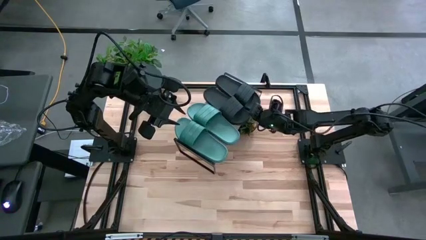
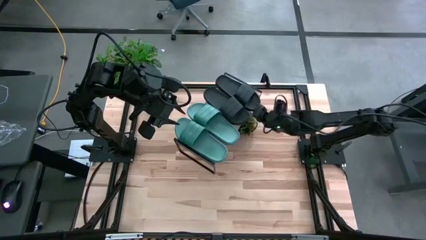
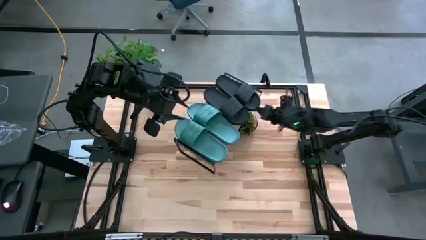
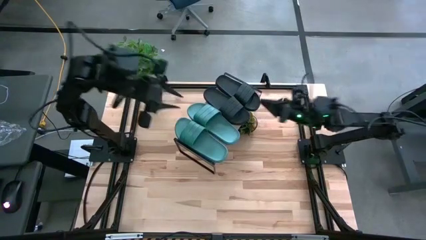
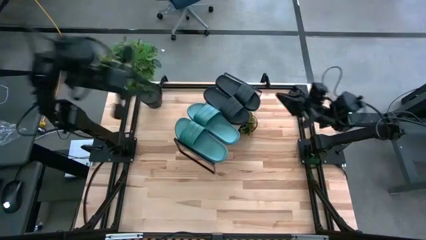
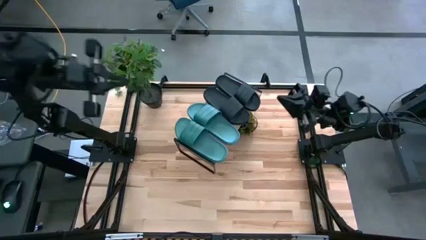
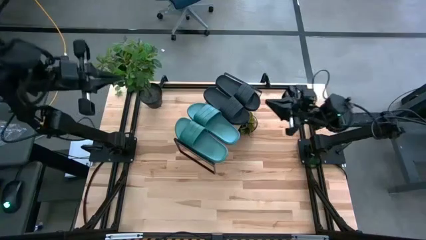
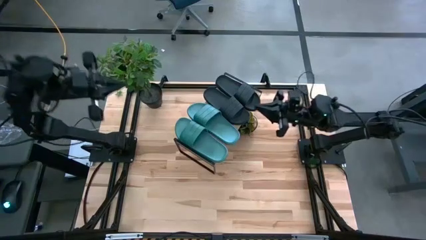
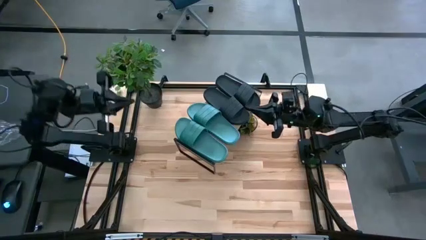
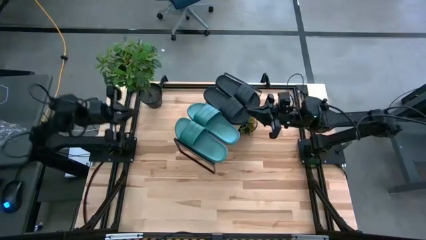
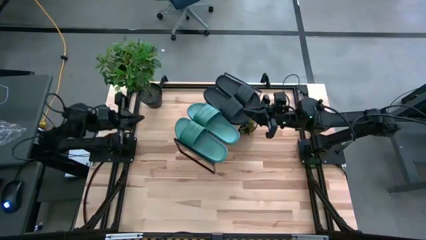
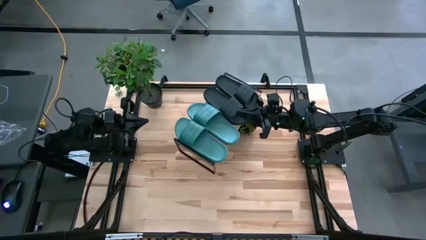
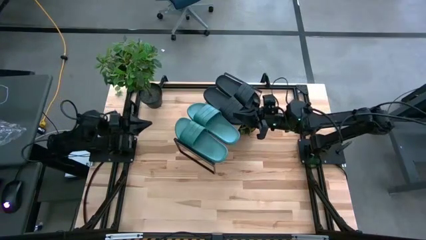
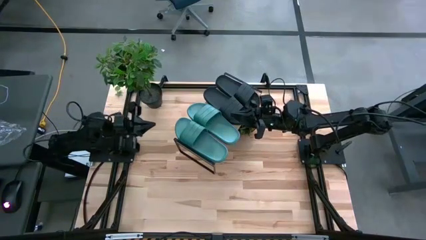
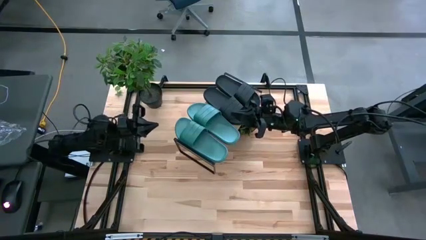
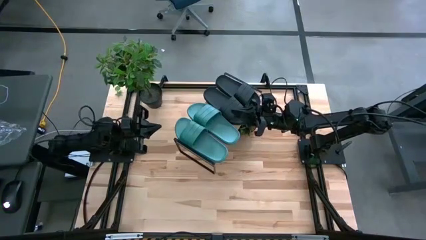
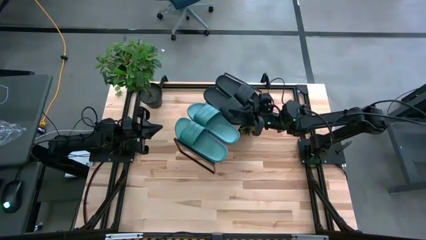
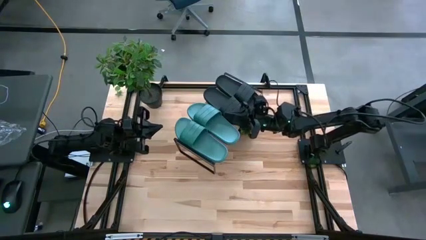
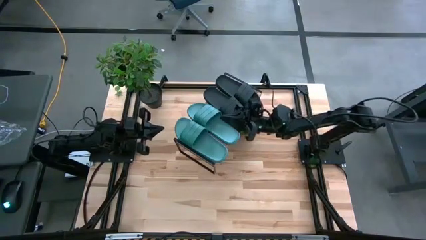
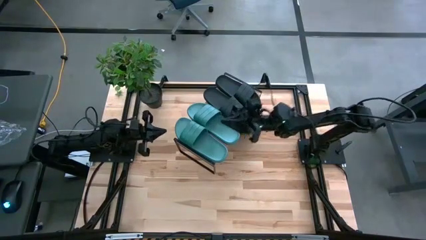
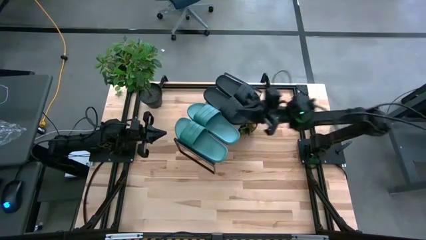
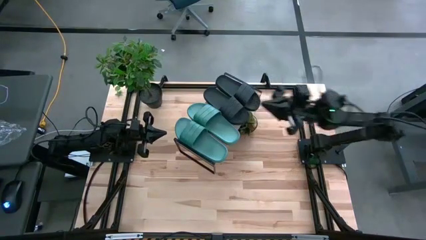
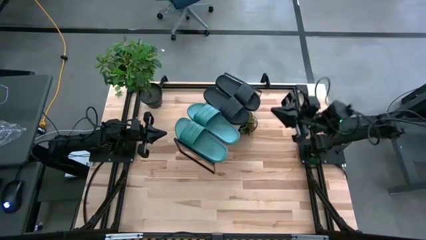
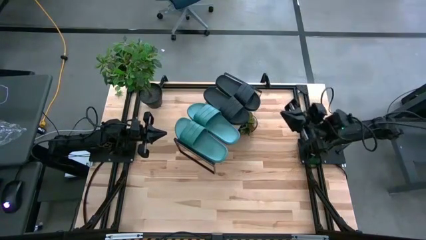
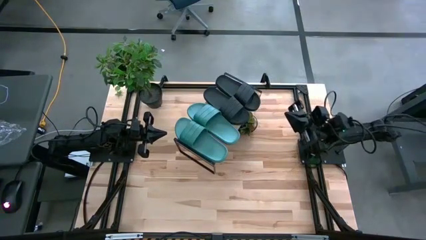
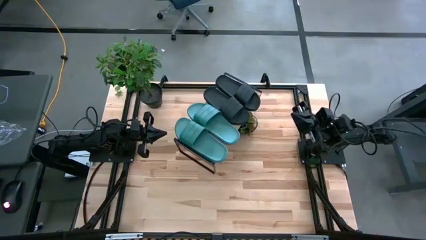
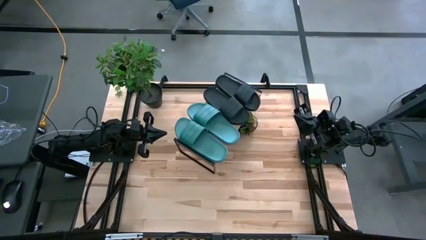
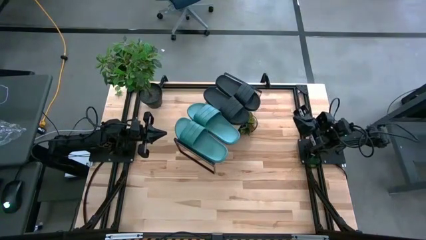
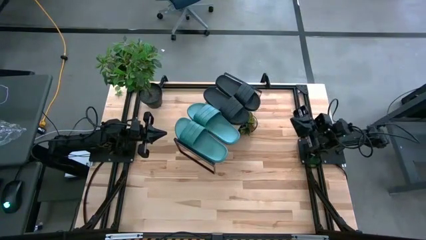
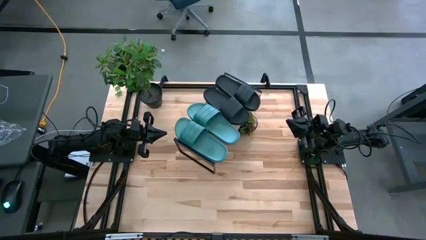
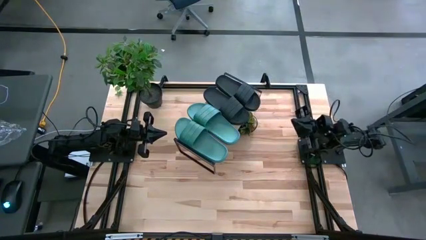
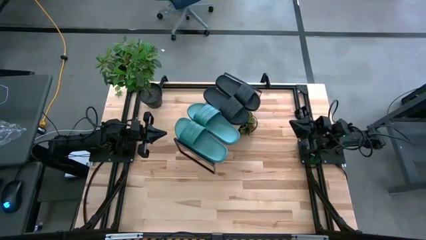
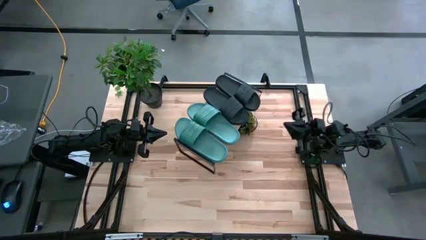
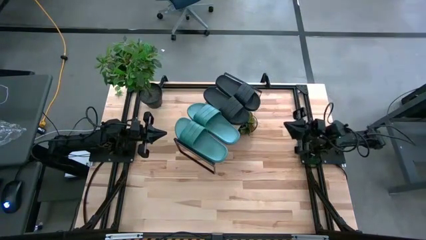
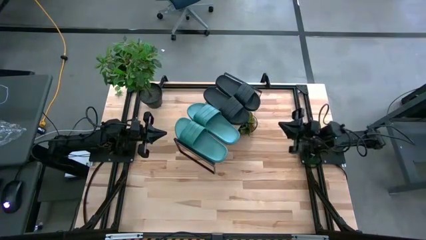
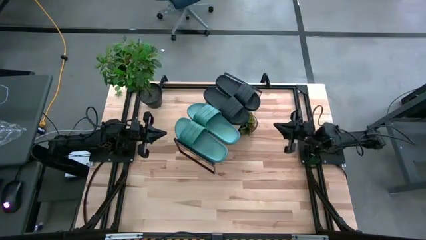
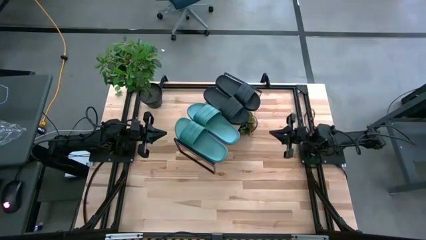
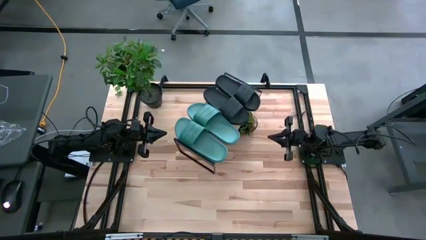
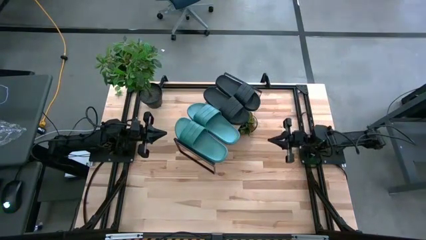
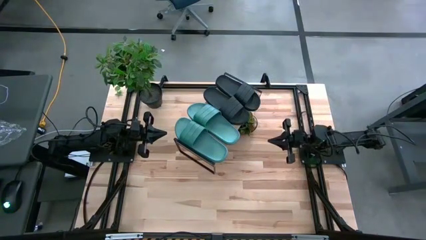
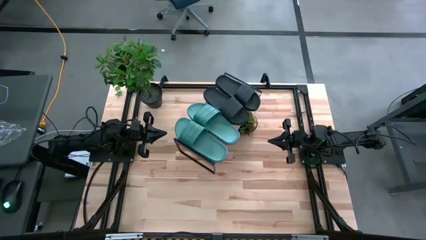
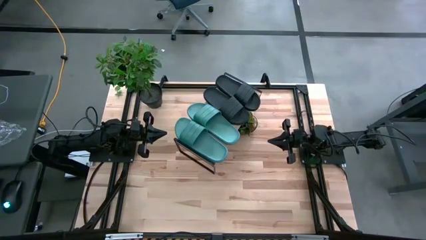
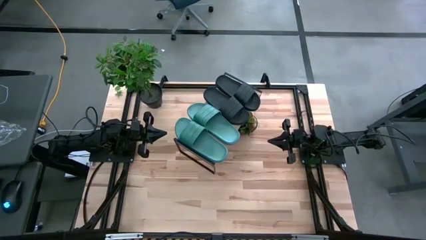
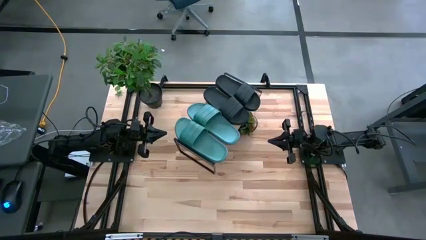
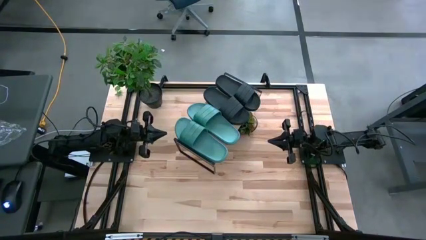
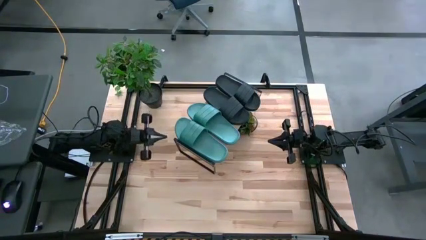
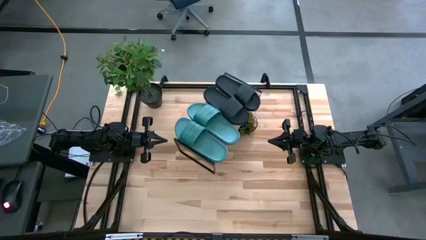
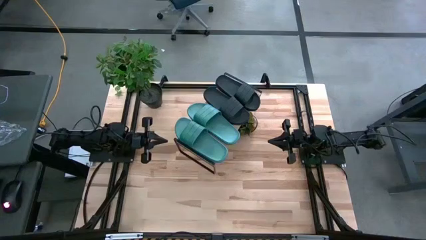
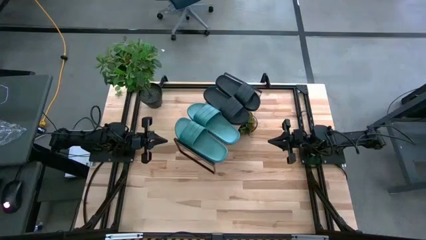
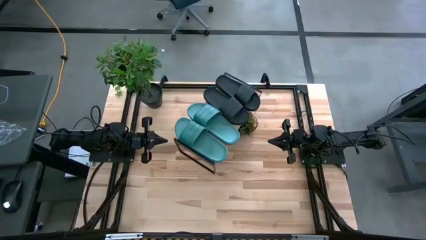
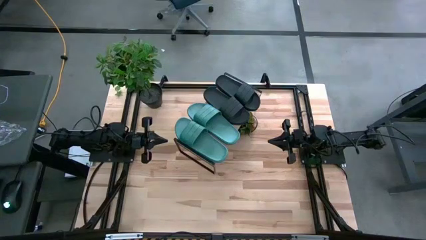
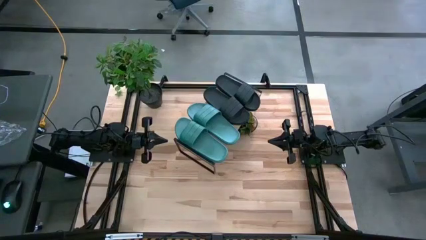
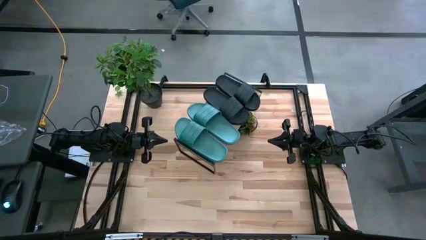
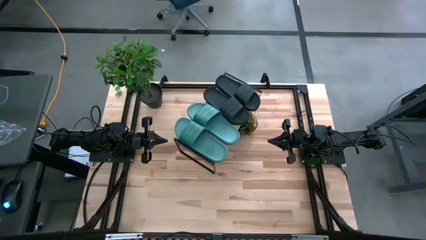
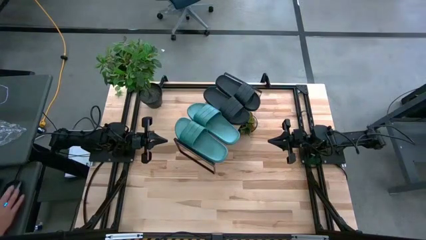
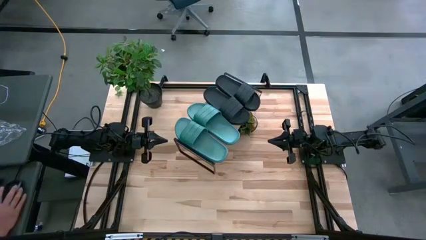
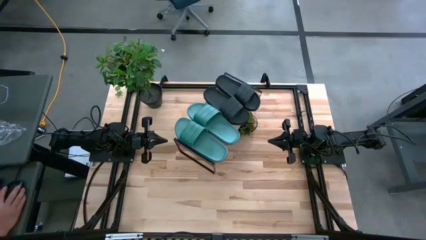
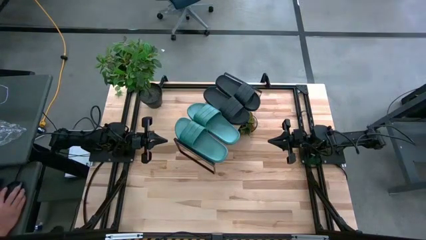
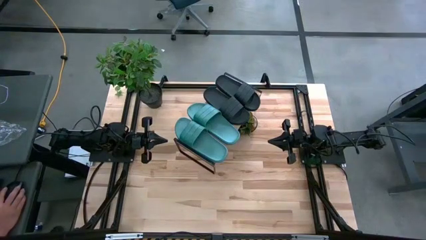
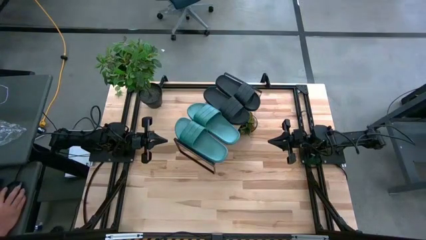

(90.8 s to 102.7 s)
Task: Pick and place slides into the shelf
Return to Home Position
